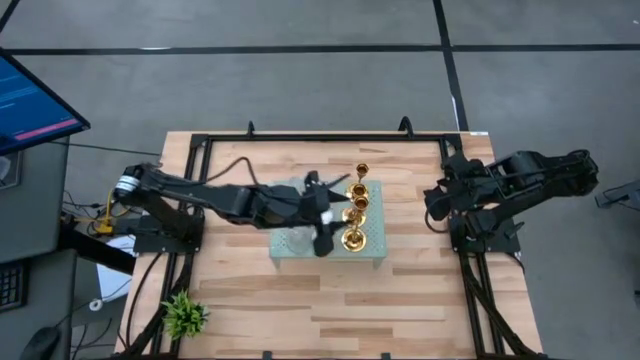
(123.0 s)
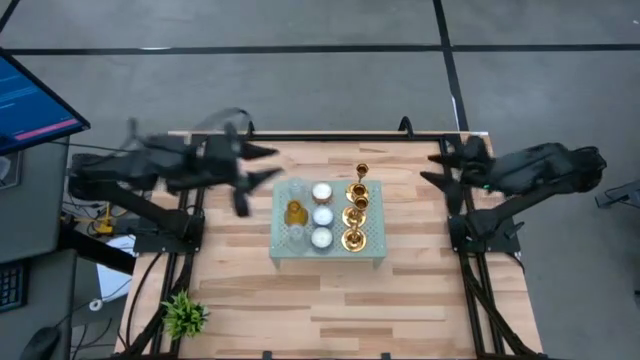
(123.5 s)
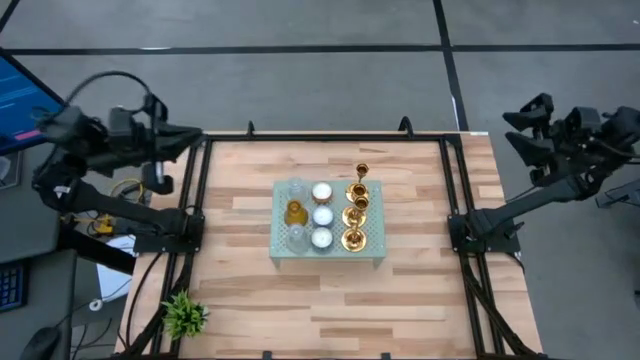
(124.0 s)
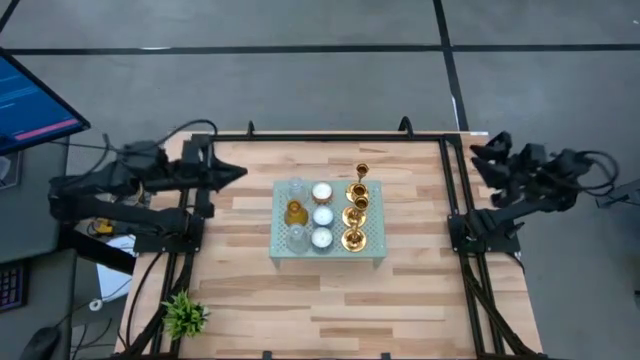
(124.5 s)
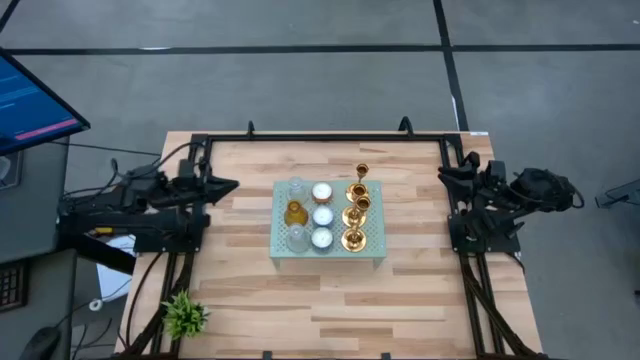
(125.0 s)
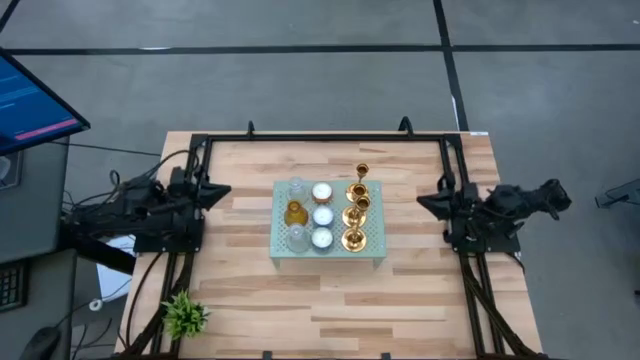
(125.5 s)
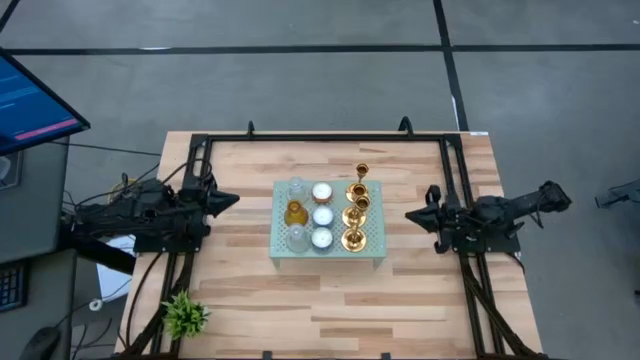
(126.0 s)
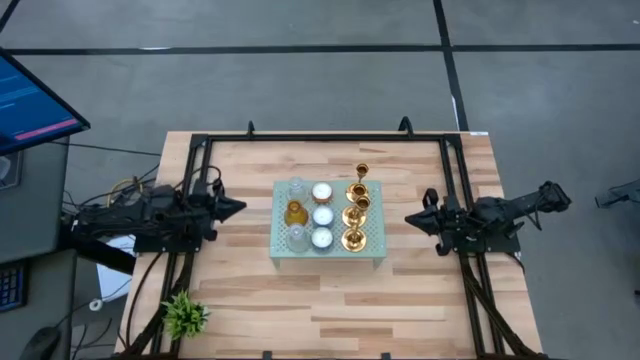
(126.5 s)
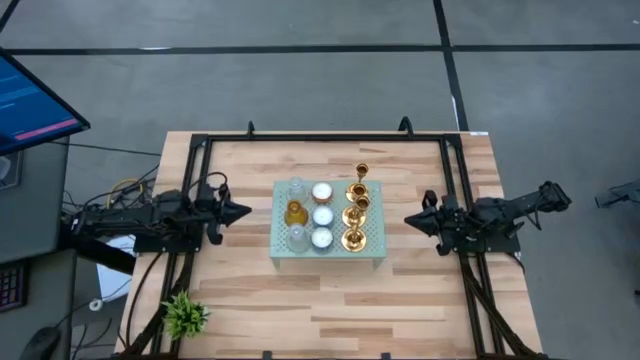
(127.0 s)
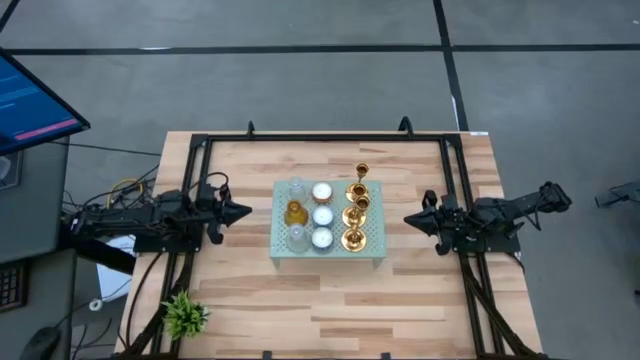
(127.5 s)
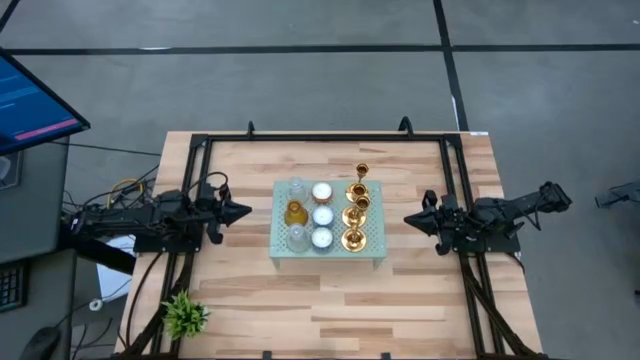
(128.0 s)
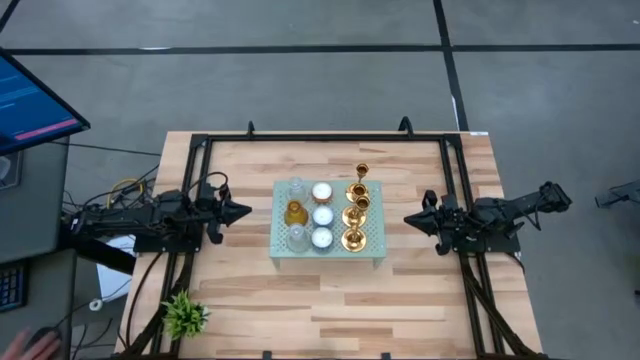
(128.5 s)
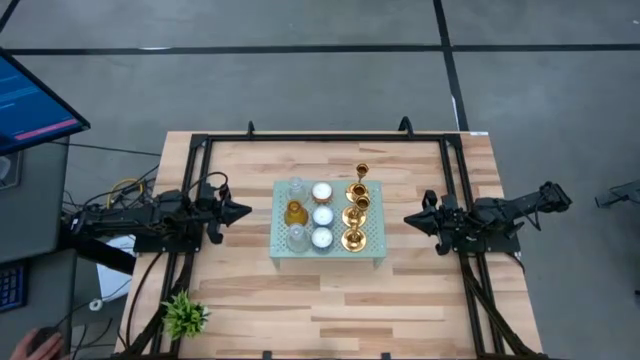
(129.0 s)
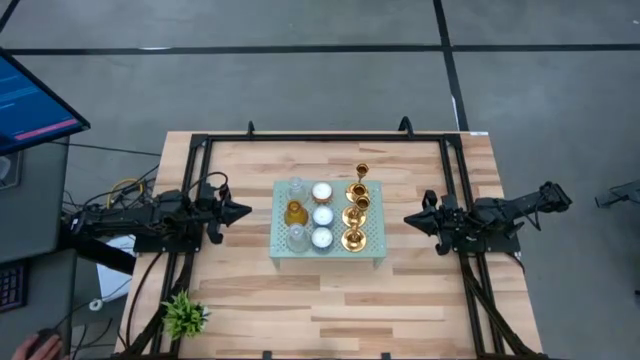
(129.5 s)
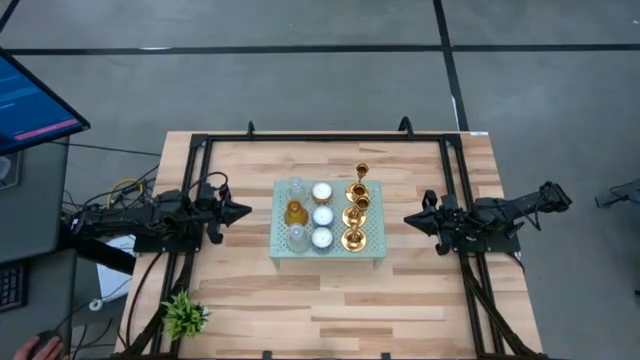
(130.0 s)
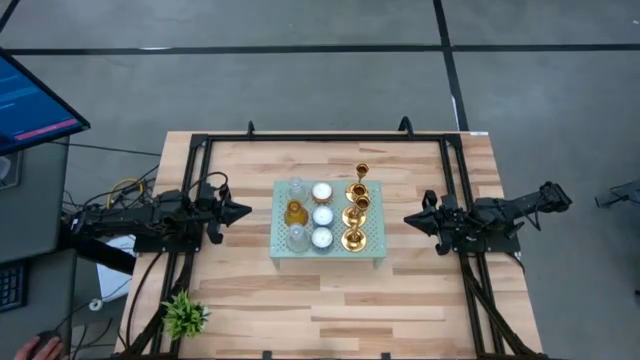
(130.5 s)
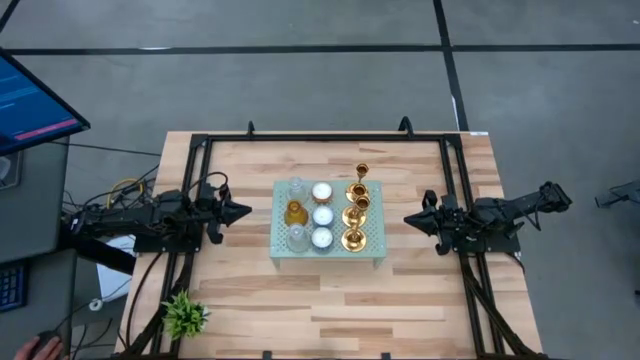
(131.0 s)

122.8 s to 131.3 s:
Task: Pick & Place candle stick holders
Return to Home Position

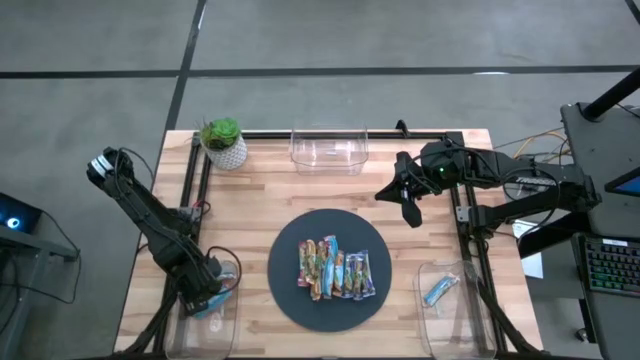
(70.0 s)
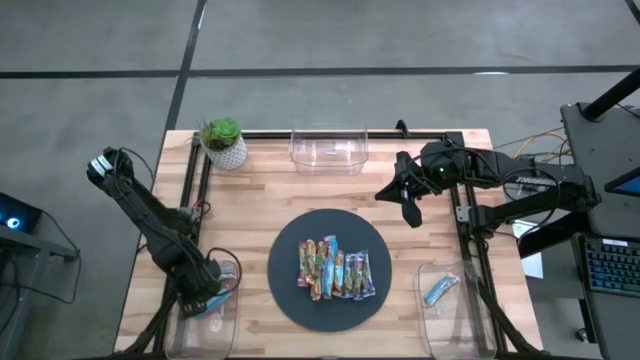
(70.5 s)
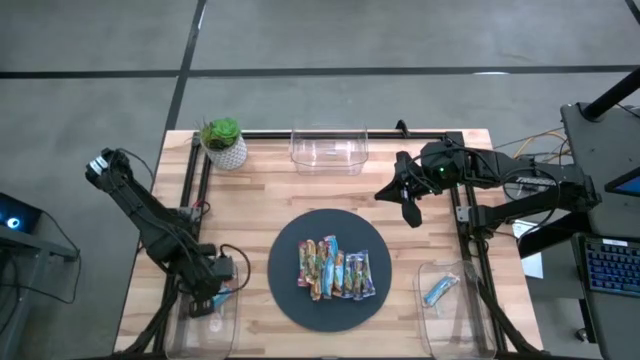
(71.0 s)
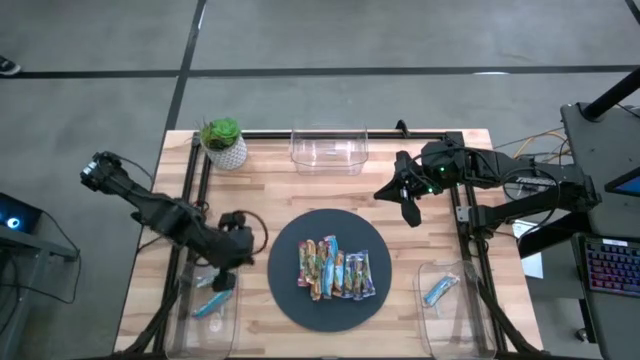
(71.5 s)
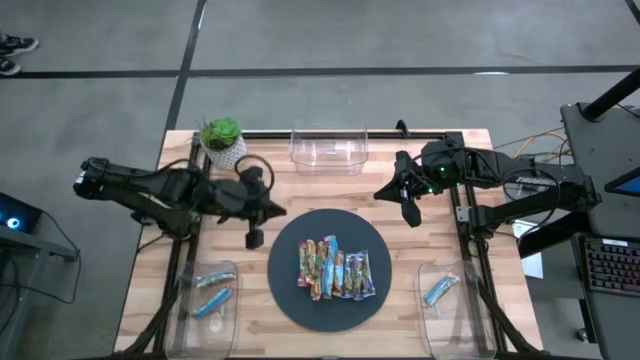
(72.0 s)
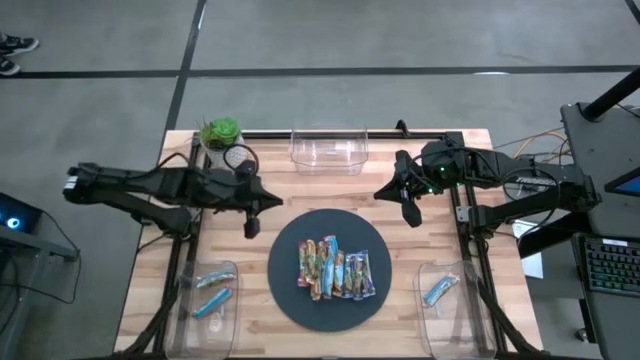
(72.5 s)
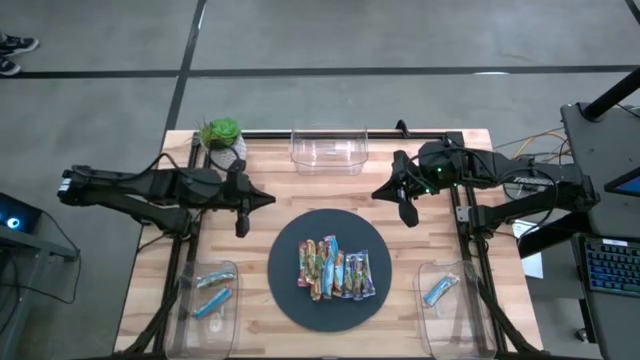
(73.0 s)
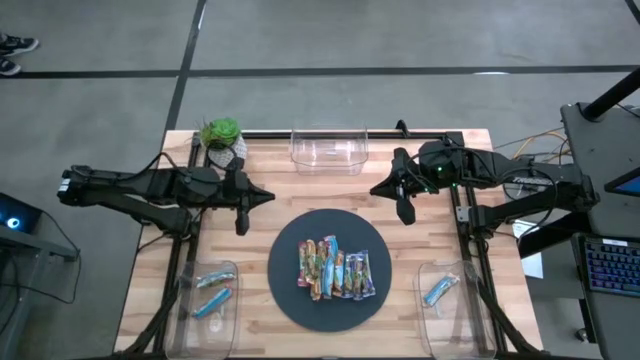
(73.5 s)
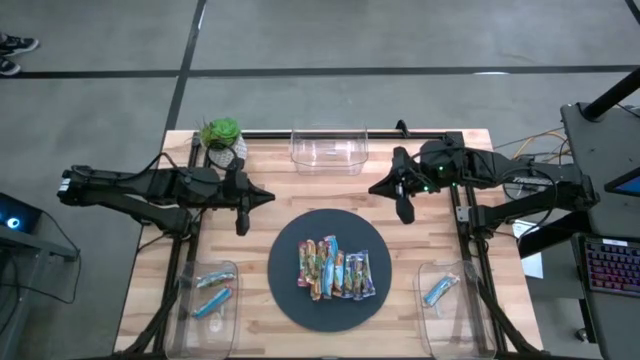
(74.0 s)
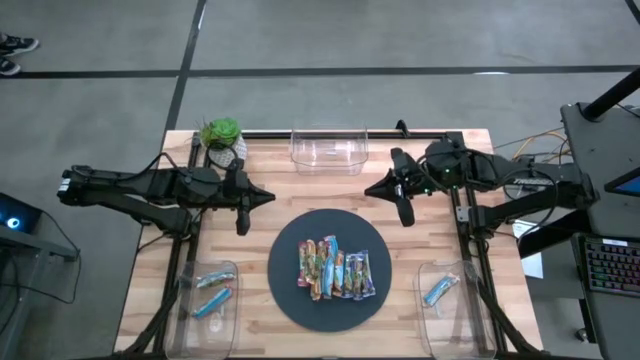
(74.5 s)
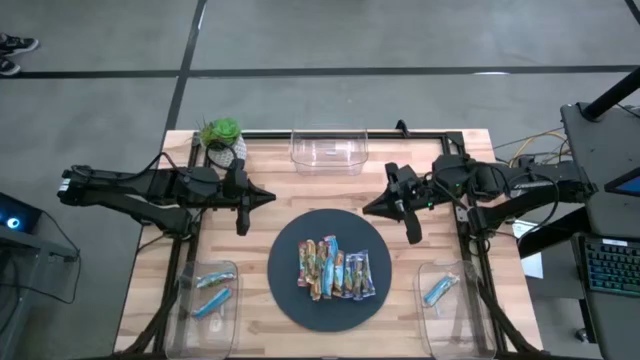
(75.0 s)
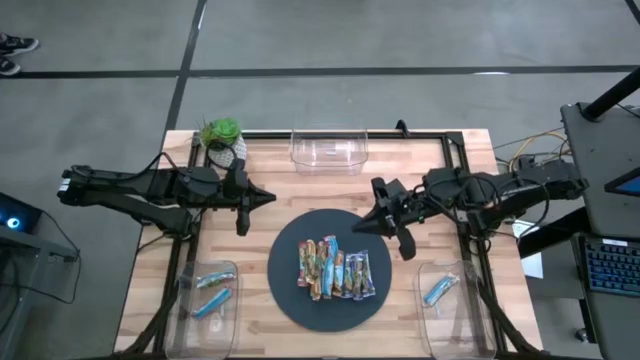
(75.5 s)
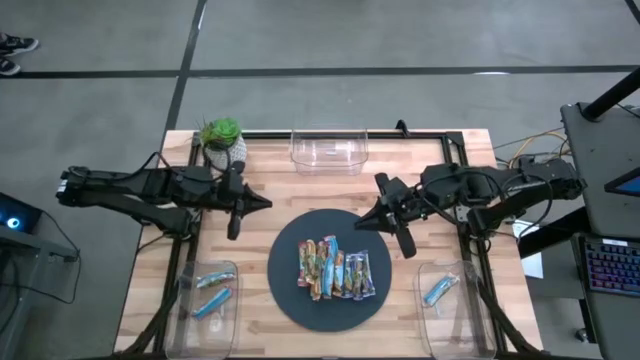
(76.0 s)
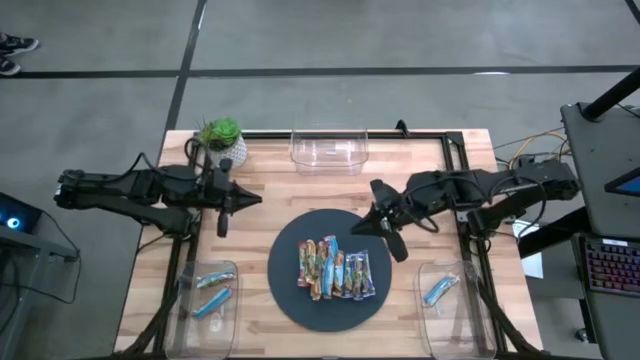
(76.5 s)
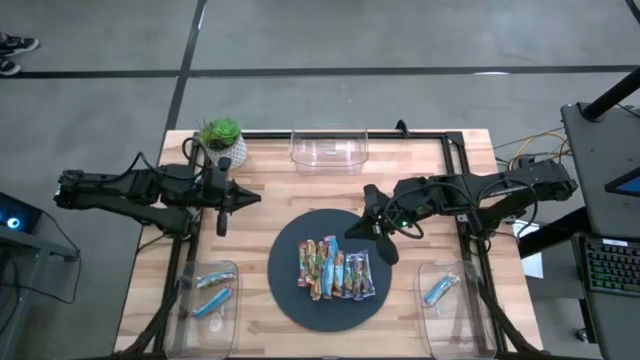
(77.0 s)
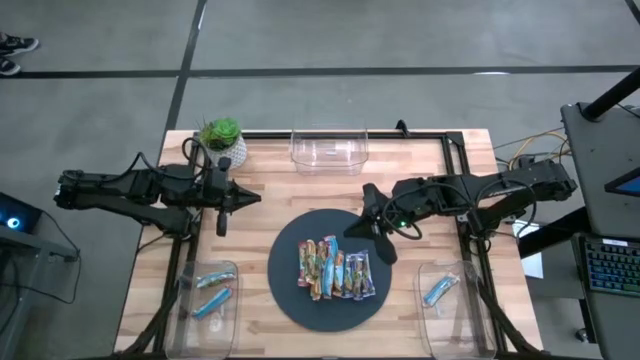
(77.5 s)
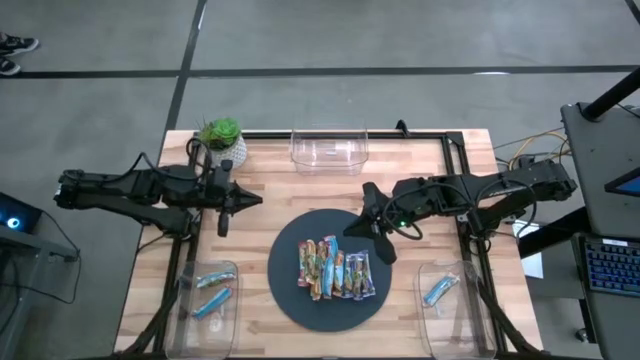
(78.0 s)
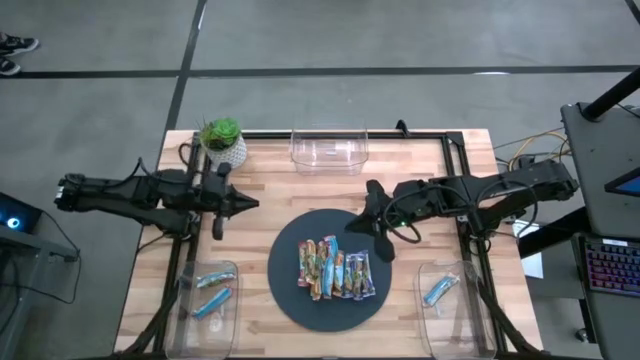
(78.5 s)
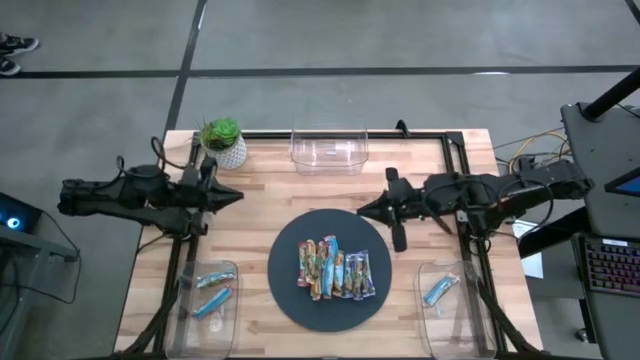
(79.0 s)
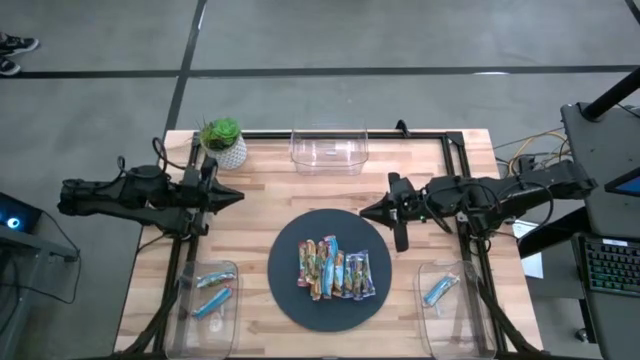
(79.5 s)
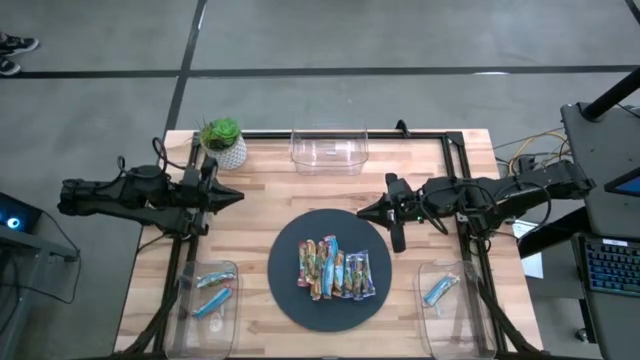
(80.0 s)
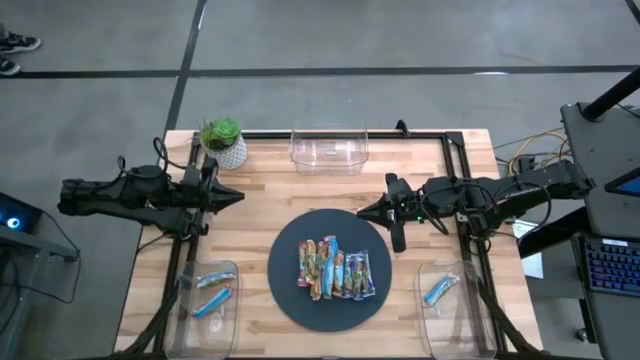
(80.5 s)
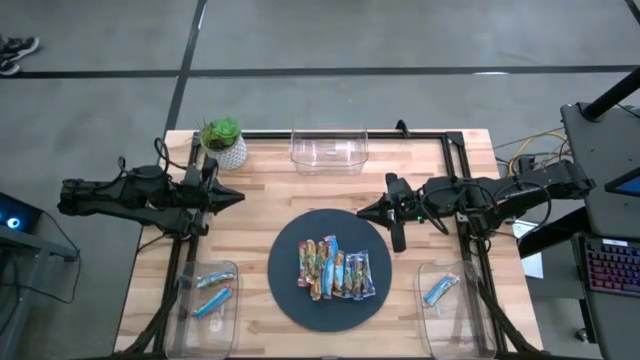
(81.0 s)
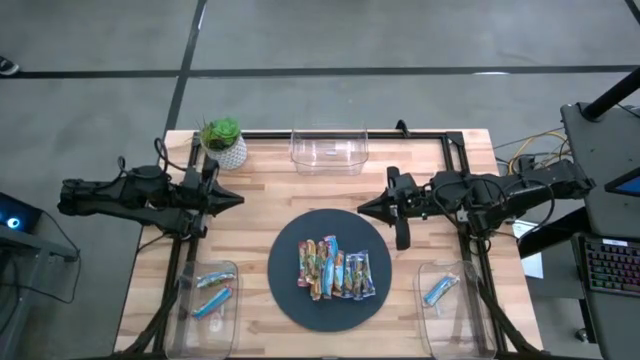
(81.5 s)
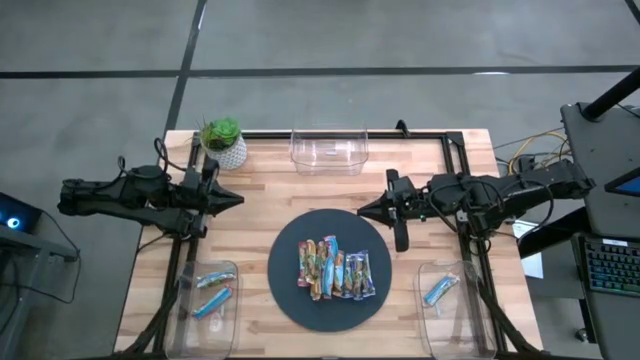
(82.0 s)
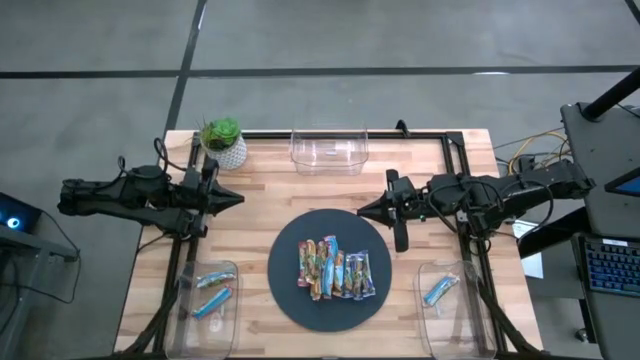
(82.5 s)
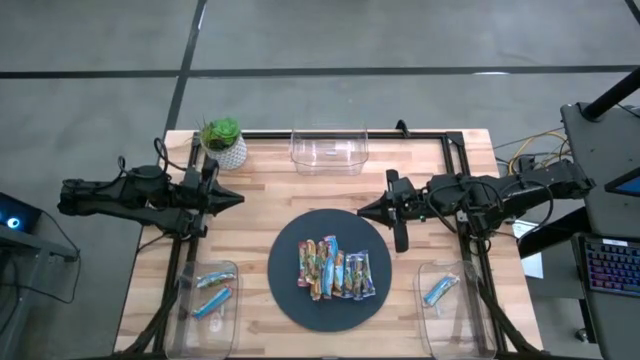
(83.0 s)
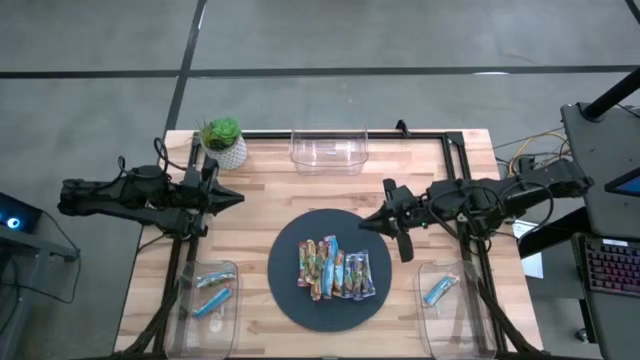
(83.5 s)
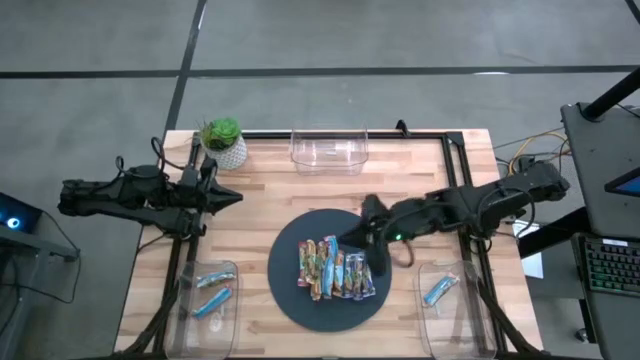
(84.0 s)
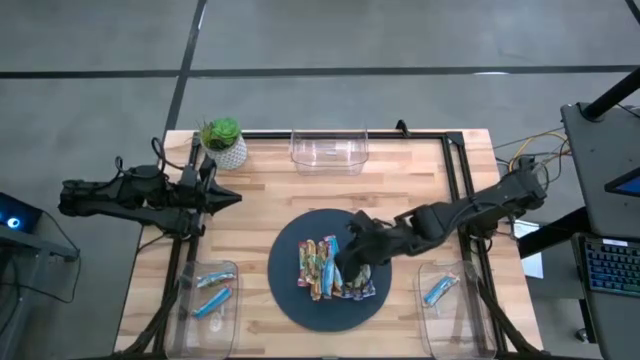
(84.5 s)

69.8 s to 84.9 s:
Task: Pick and place Granola Bars by type
Put the blue granola bar into the top transparent bin
